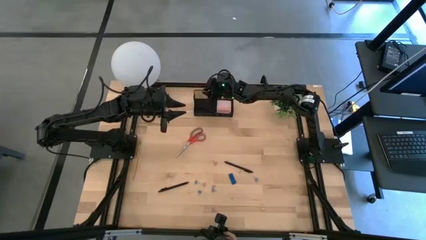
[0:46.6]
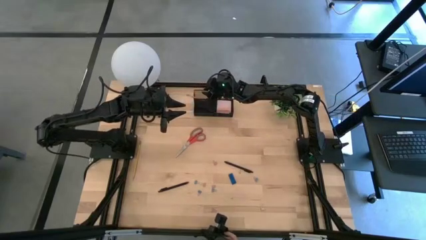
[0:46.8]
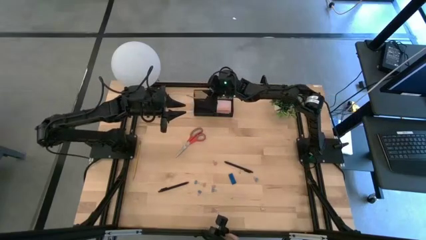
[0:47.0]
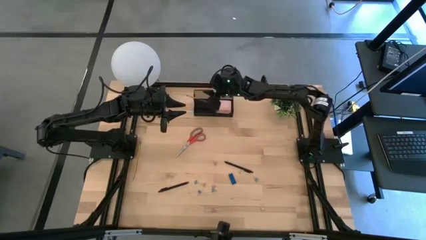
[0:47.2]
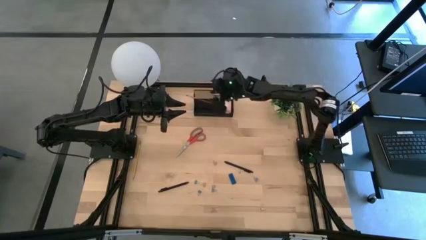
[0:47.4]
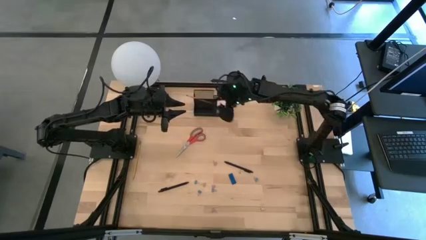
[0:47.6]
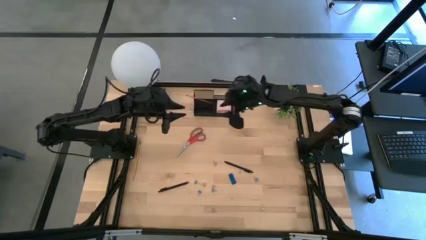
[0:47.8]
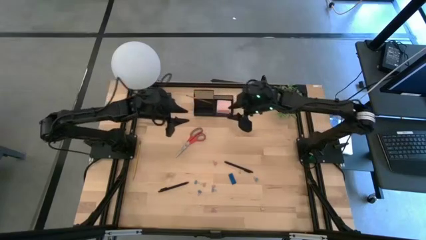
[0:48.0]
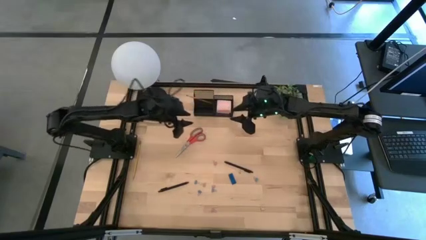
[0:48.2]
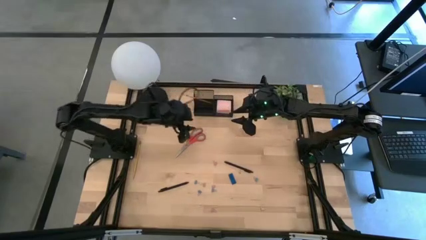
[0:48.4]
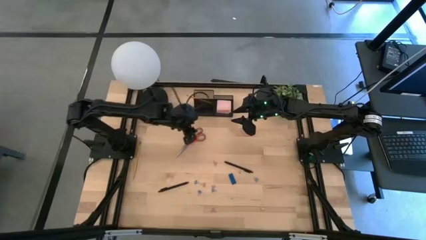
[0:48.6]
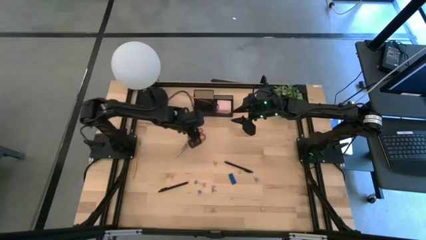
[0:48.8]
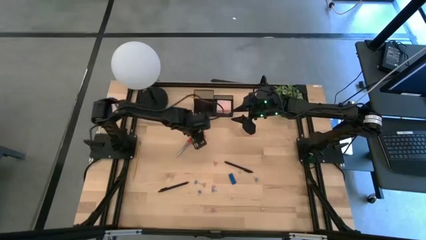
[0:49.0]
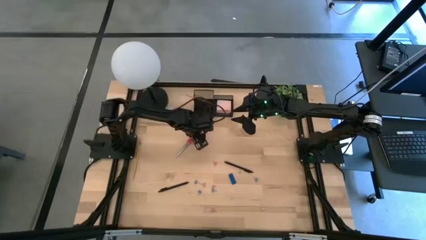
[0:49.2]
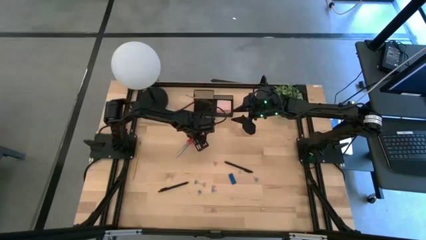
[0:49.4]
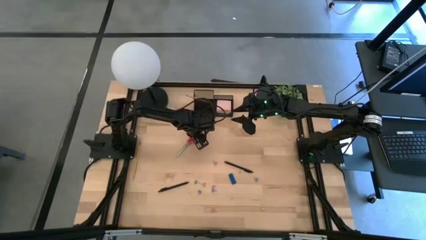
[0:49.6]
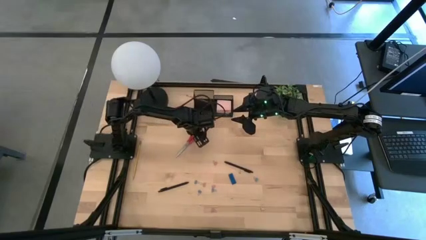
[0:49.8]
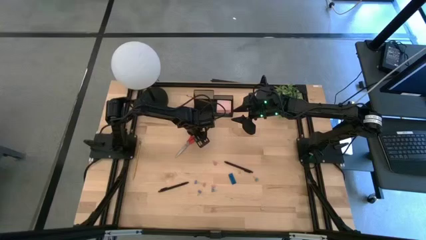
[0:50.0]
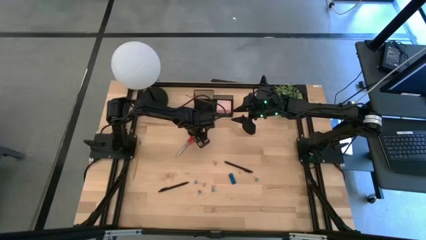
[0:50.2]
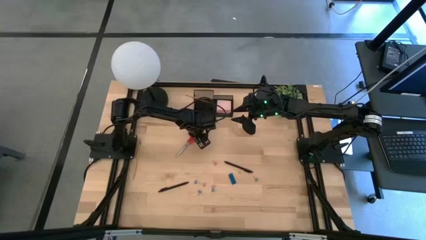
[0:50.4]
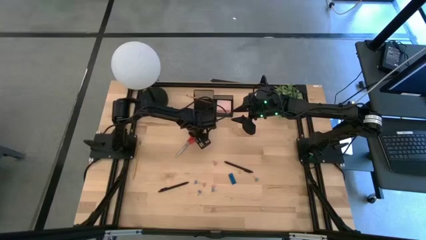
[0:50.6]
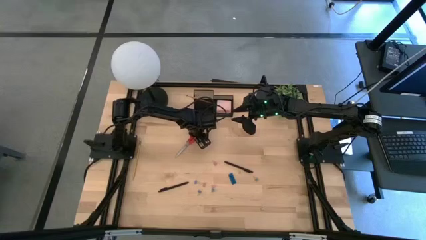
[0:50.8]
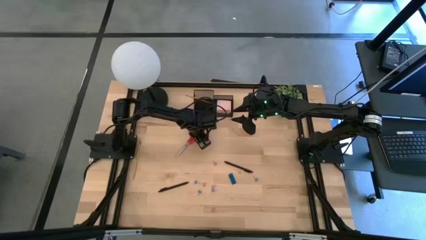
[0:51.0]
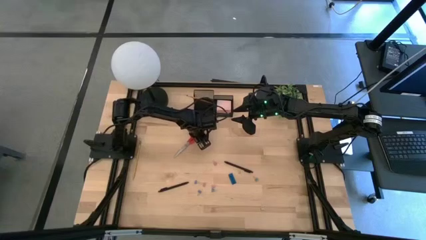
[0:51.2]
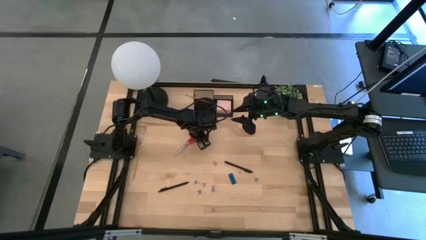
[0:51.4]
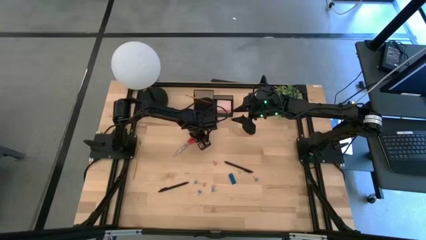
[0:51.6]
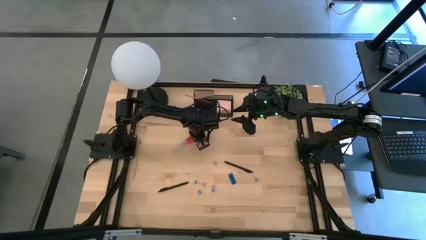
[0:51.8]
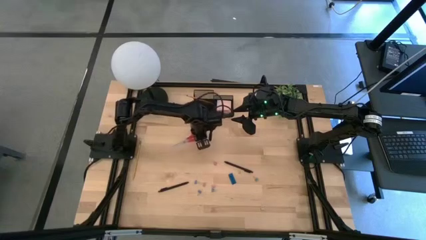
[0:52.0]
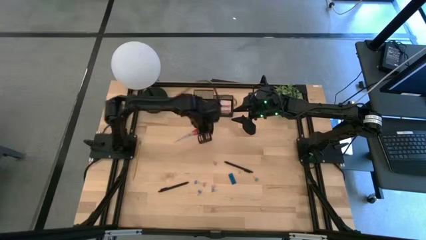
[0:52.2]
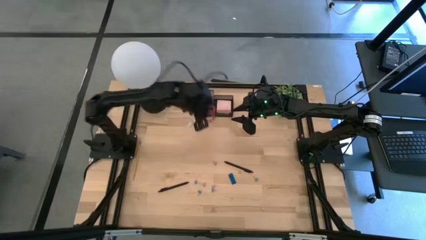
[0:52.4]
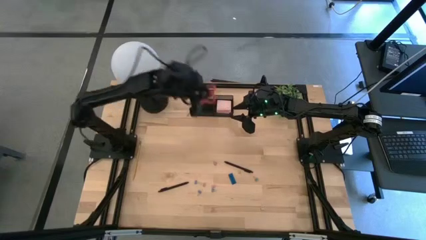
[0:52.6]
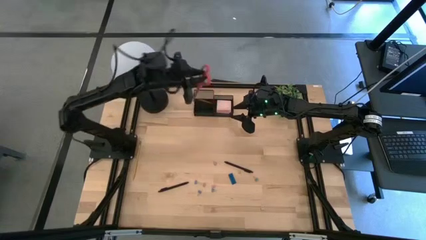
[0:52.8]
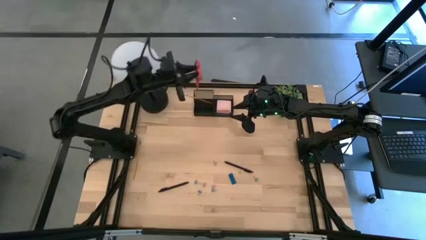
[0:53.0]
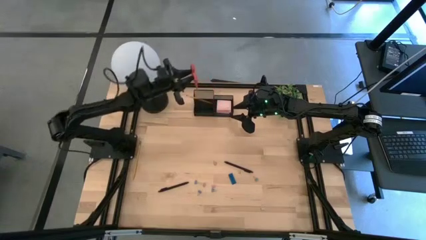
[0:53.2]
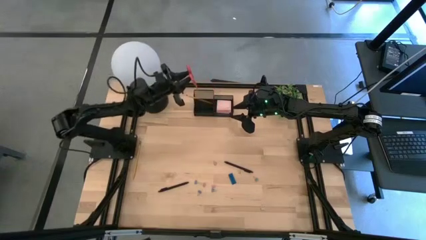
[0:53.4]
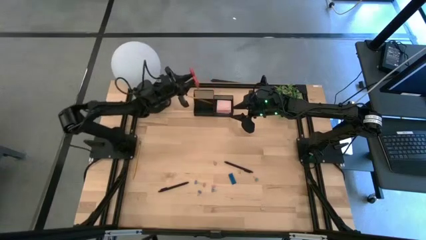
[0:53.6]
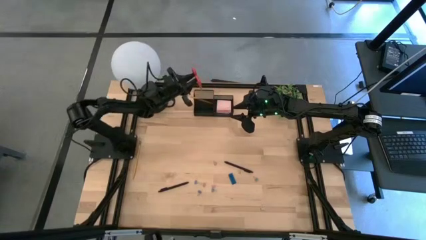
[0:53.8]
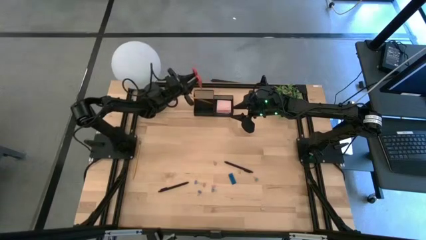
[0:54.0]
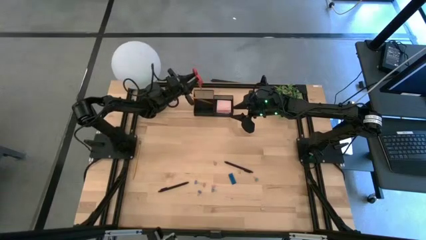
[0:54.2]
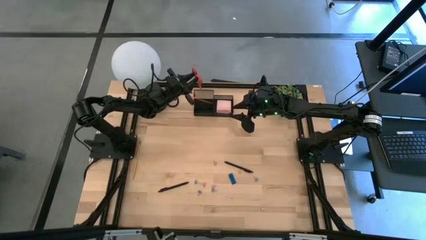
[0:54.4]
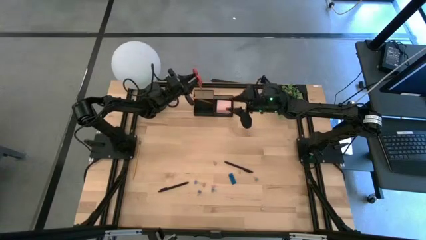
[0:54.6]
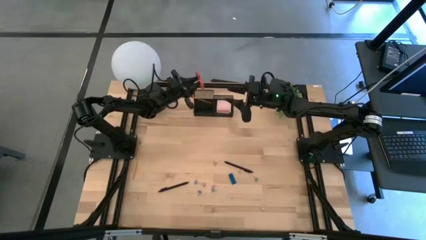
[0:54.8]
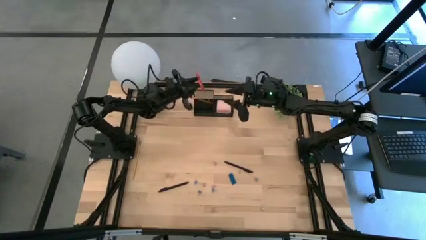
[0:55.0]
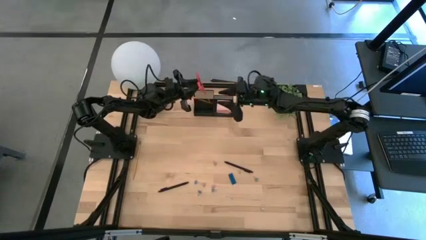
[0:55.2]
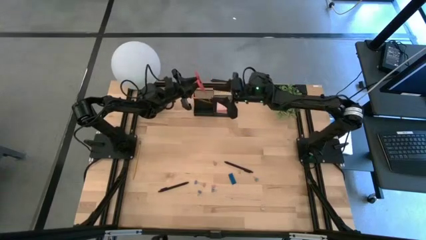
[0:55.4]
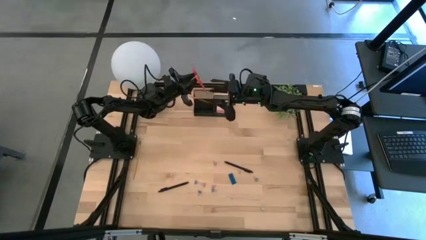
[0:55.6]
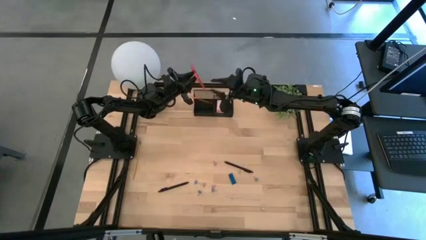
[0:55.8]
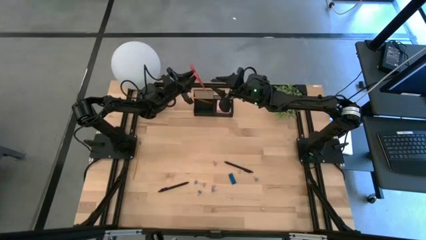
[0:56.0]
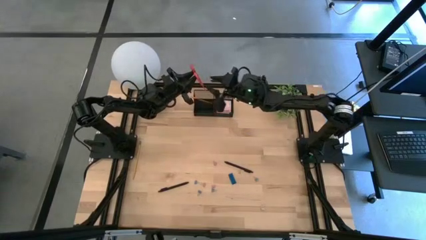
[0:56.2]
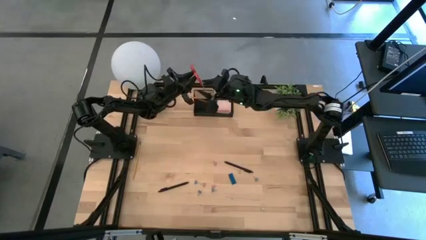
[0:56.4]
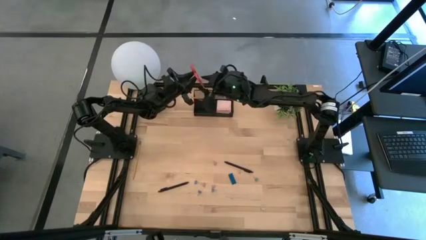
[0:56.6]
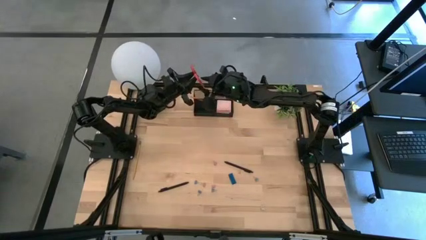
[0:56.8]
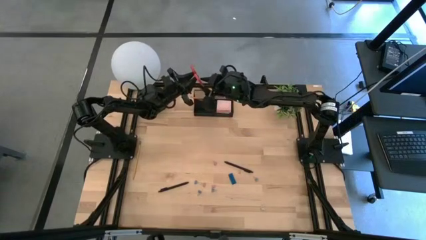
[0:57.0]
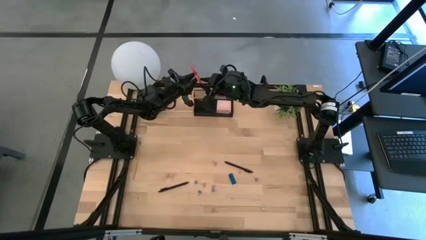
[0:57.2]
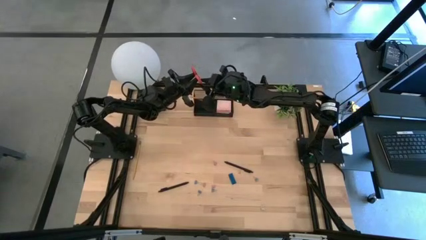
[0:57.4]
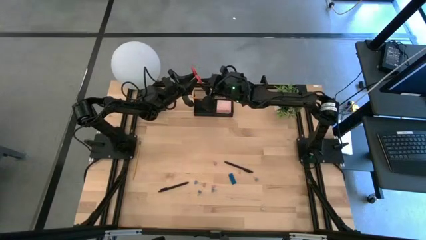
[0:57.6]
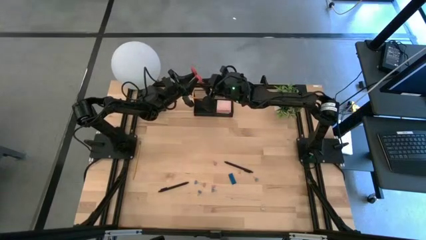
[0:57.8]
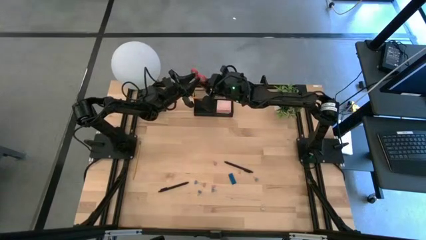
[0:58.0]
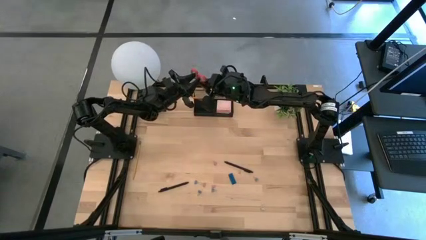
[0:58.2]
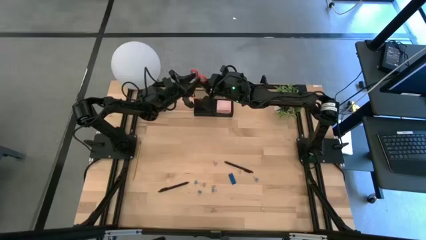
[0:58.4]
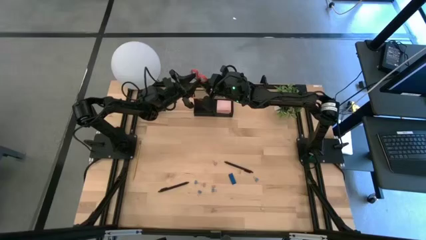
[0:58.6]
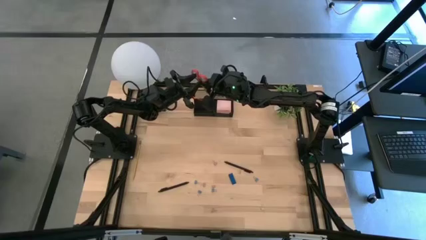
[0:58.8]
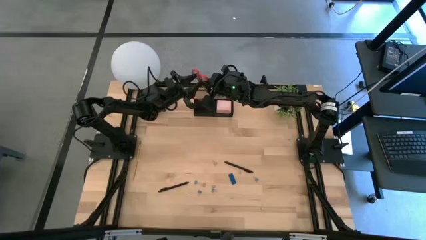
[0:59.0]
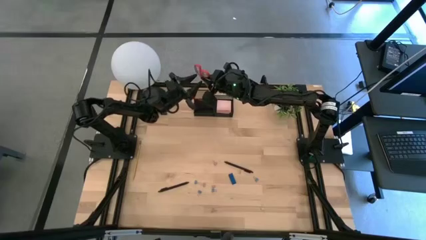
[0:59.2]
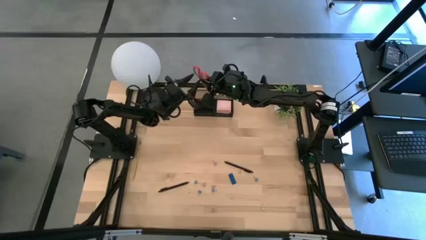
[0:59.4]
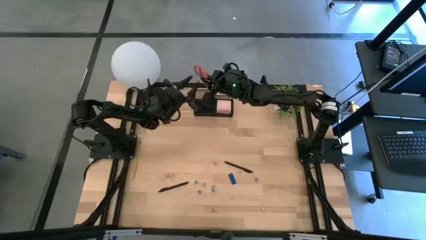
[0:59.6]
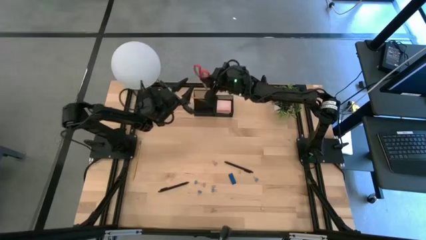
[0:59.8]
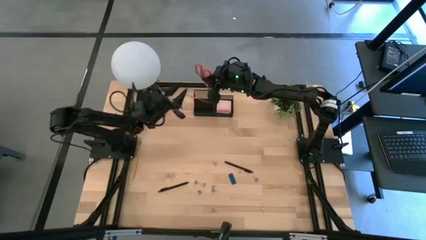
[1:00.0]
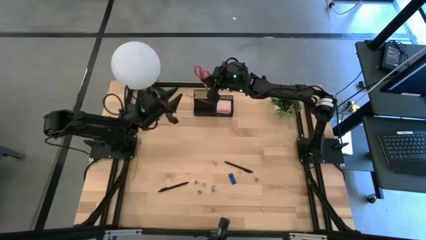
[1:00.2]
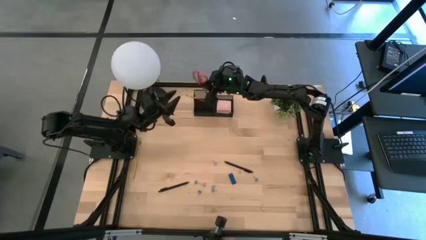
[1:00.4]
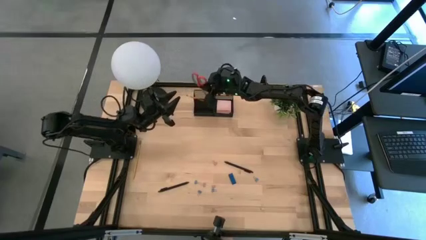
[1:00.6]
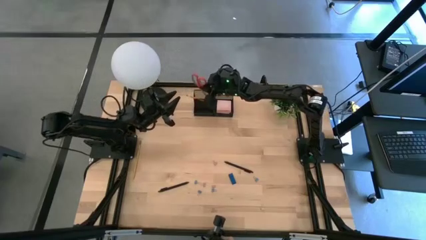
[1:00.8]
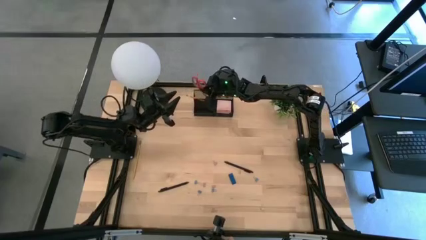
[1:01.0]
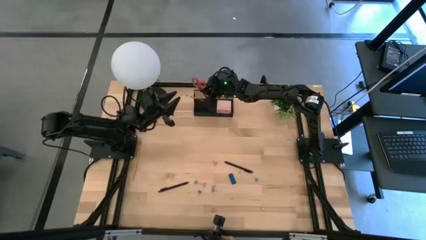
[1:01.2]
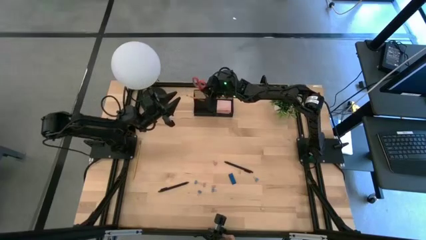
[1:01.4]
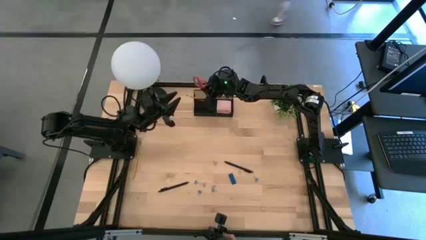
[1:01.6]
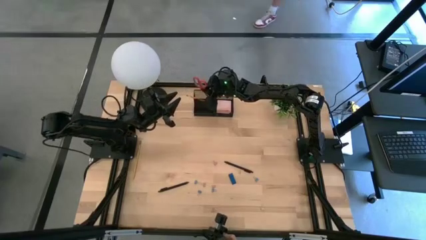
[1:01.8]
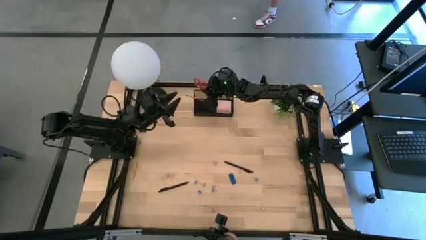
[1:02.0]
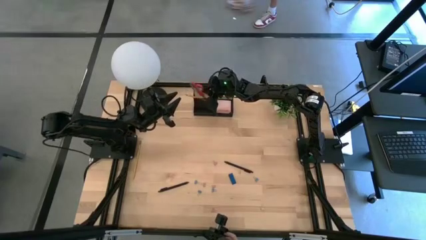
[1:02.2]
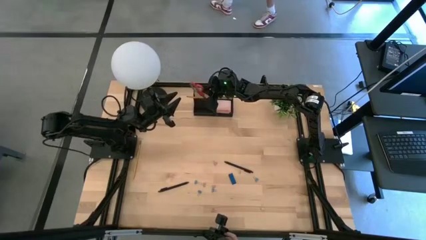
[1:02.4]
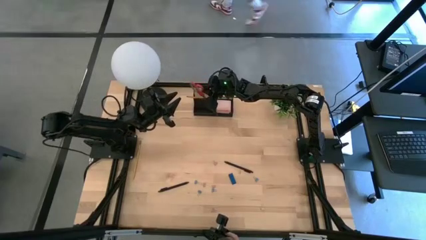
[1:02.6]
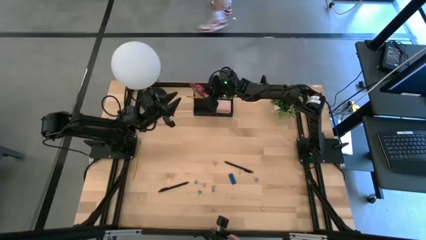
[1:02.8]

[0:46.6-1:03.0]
Task: Pick and place office supplies into organizer
Put the red scissors into the black desk organizer
